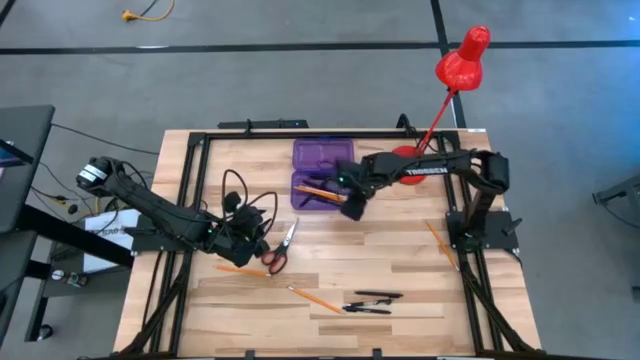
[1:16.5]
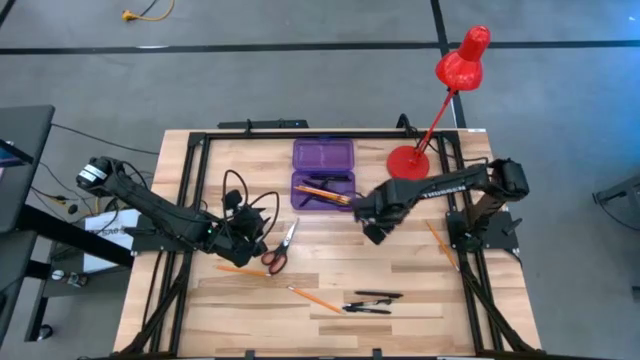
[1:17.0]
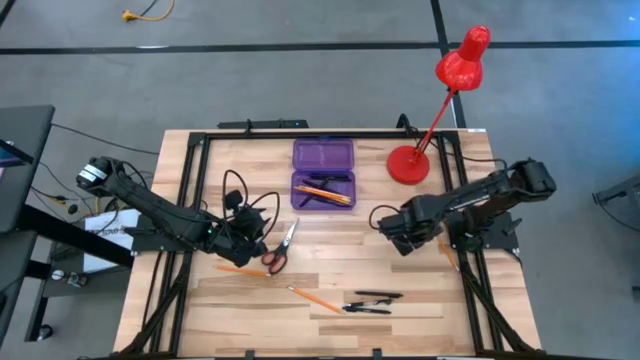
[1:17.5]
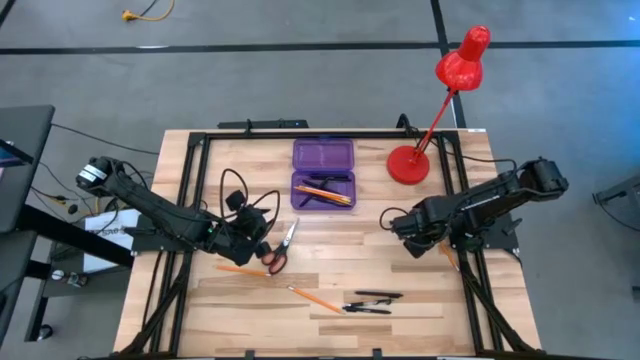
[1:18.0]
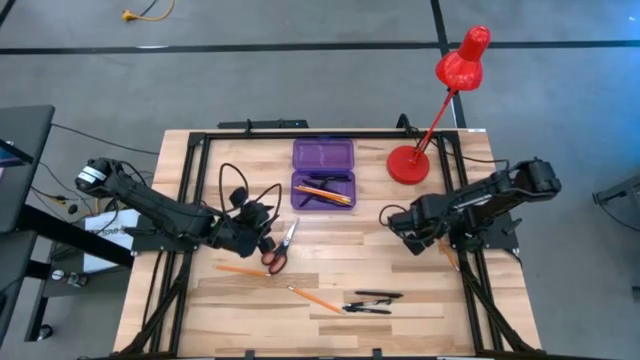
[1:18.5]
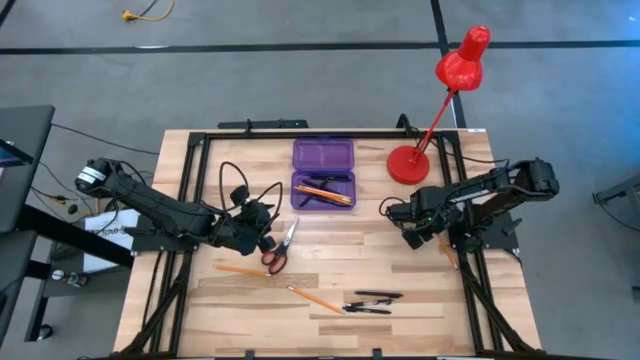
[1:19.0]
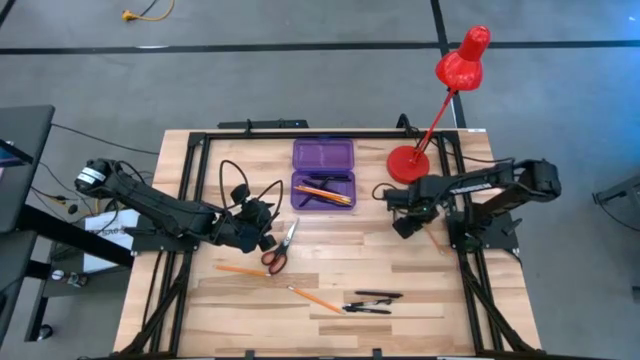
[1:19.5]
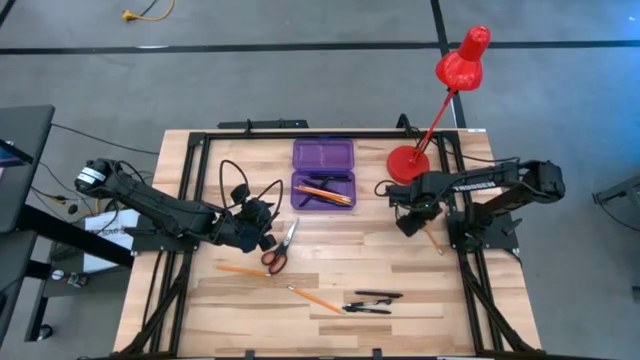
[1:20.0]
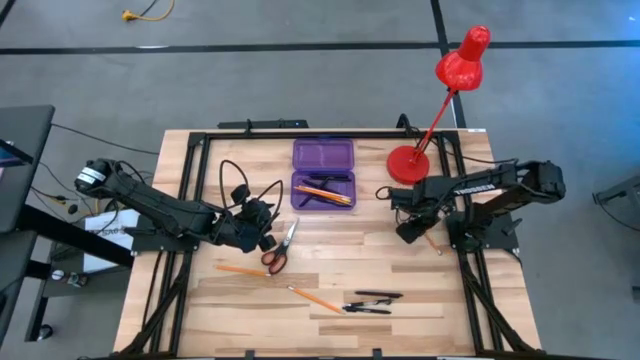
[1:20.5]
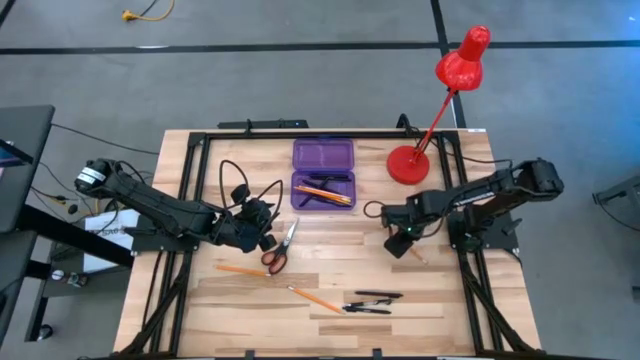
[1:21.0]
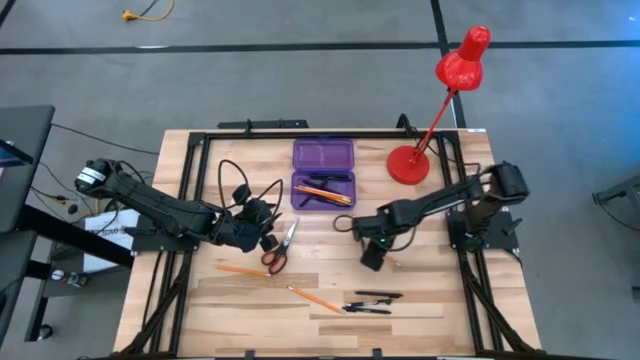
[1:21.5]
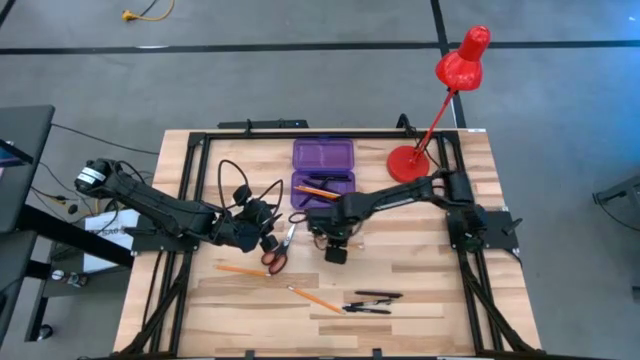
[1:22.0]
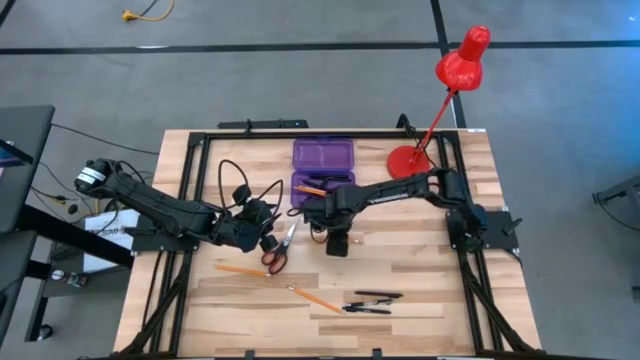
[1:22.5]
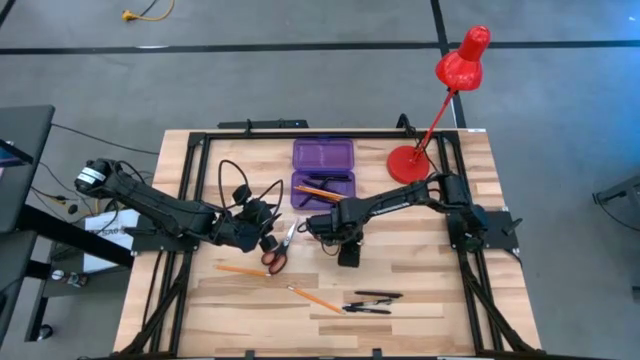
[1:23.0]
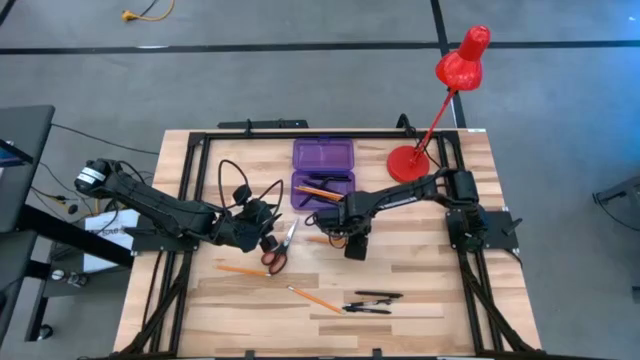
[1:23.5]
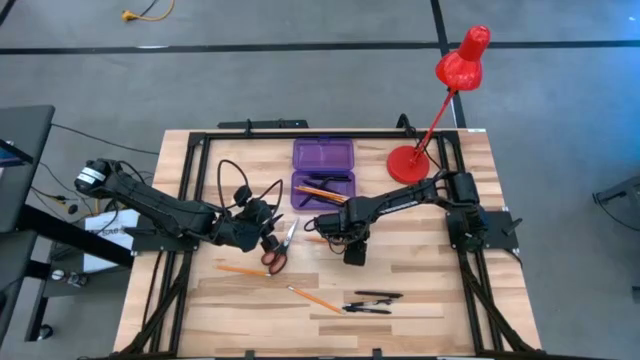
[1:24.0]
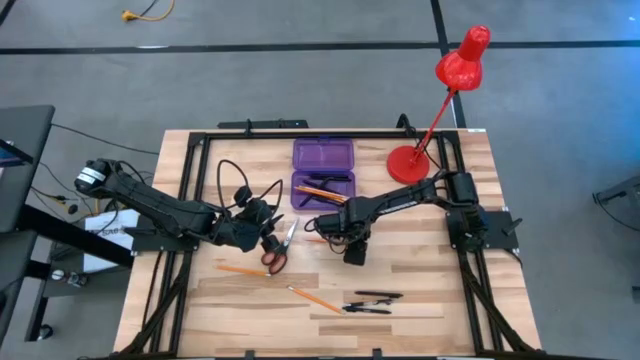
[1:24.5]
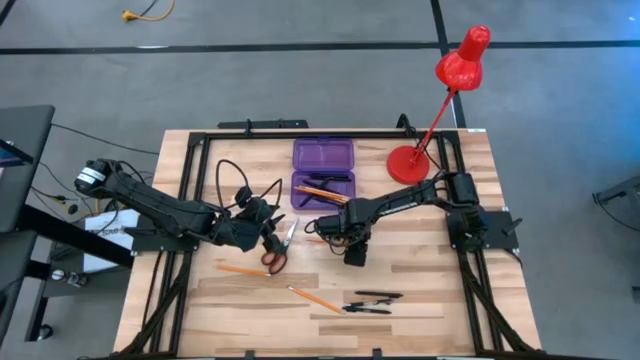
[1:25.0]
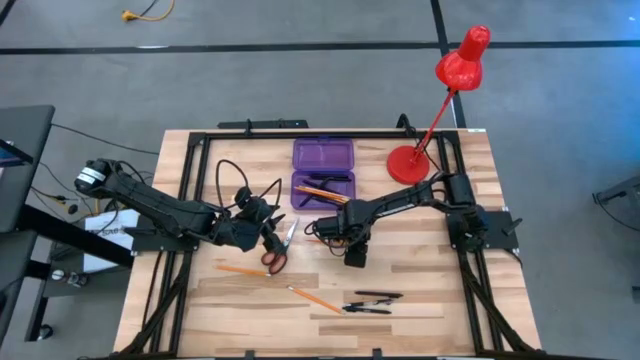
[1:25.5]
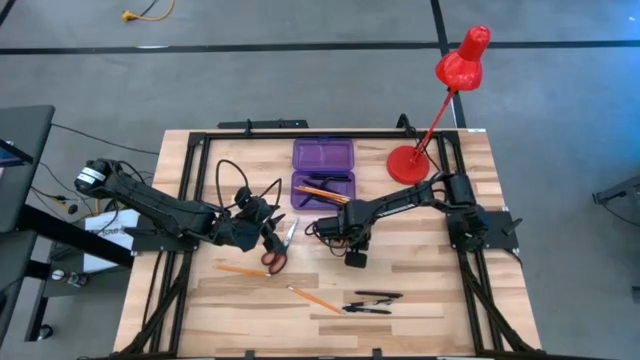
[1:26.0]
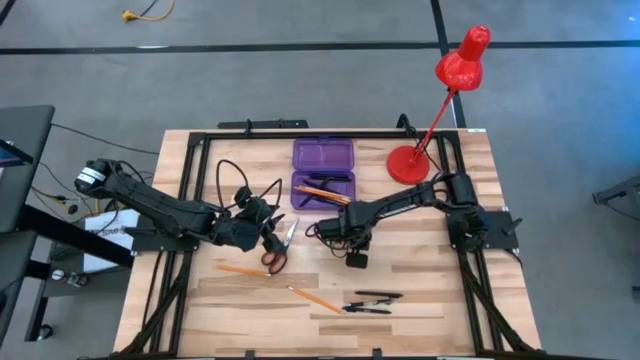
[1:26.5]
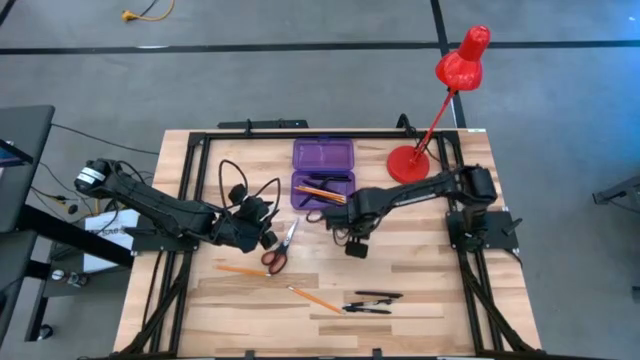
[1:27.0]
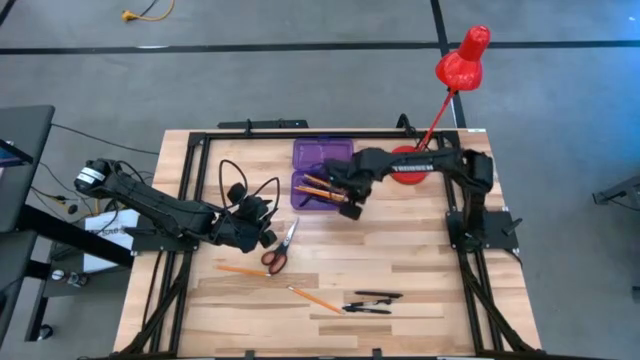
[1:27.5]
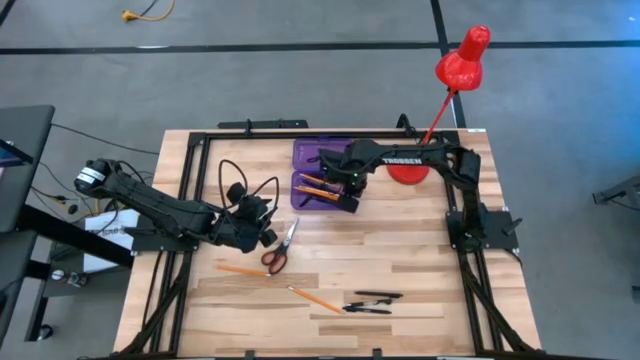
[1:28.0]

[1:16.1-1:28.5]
Task: Pick & place school supplies into a supply box
Put the yellow pencil into the purple supply box

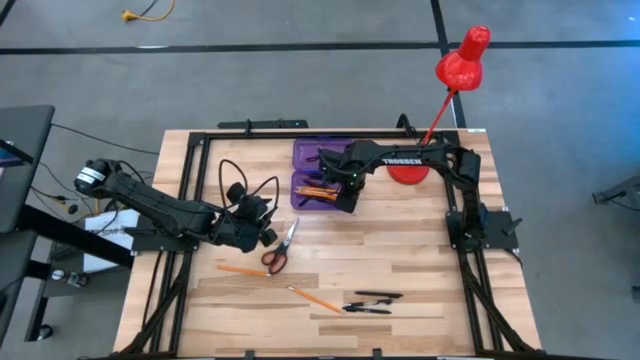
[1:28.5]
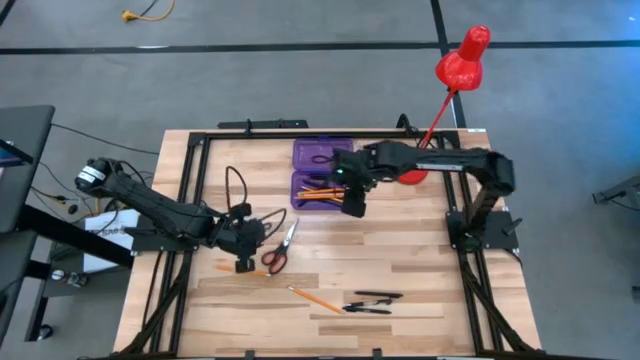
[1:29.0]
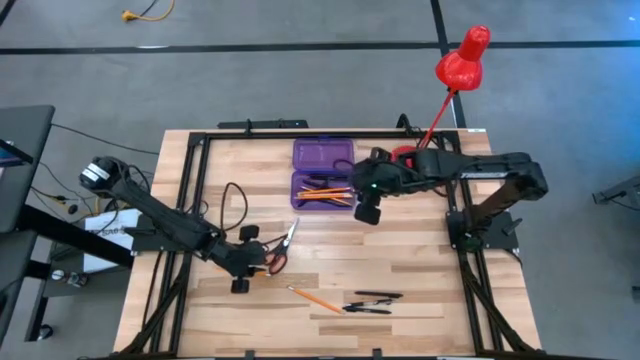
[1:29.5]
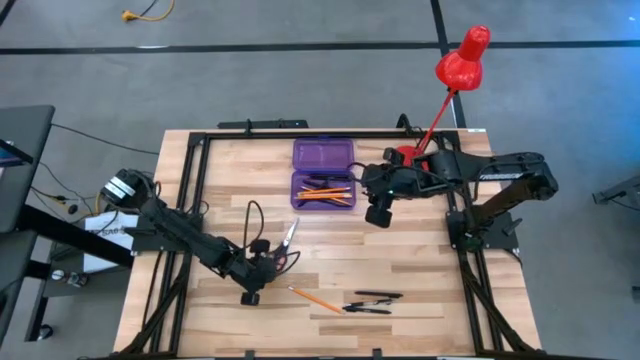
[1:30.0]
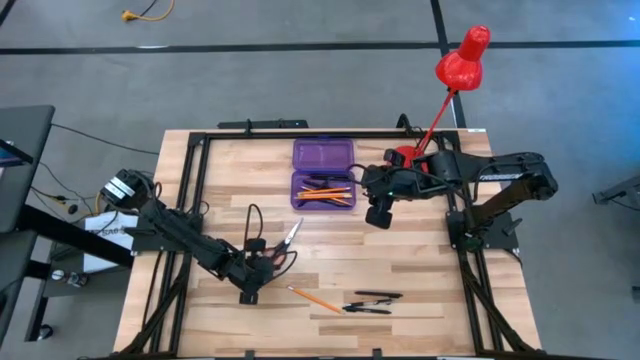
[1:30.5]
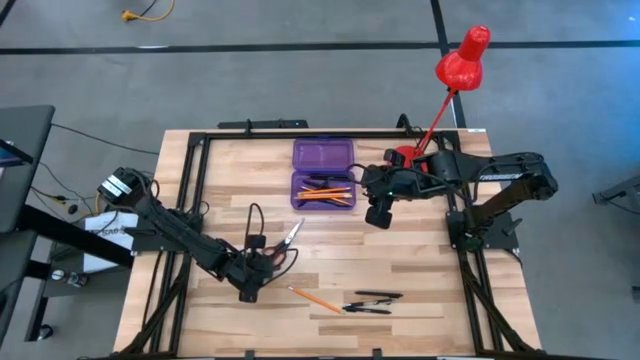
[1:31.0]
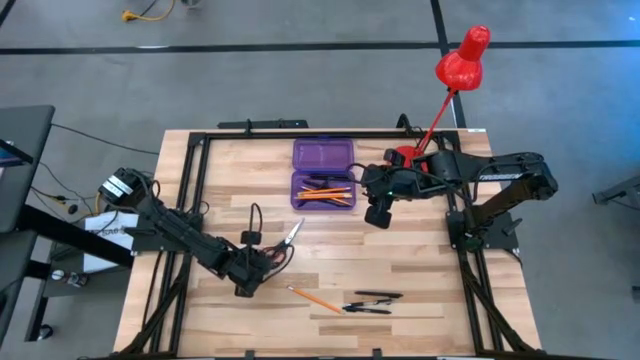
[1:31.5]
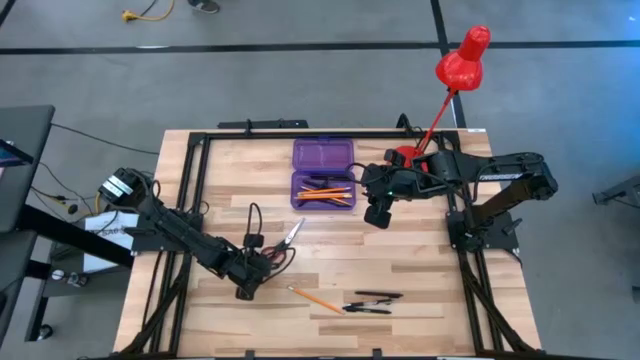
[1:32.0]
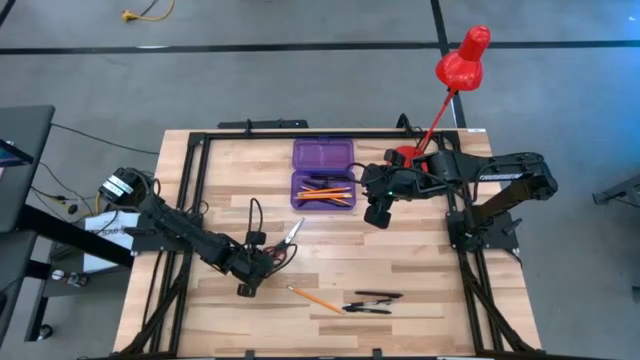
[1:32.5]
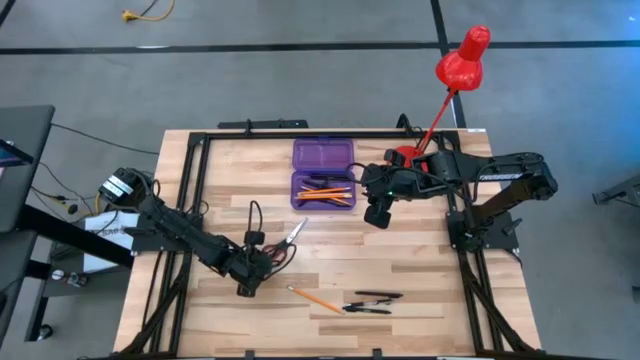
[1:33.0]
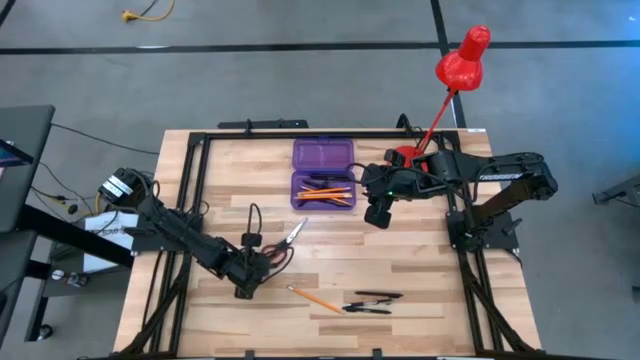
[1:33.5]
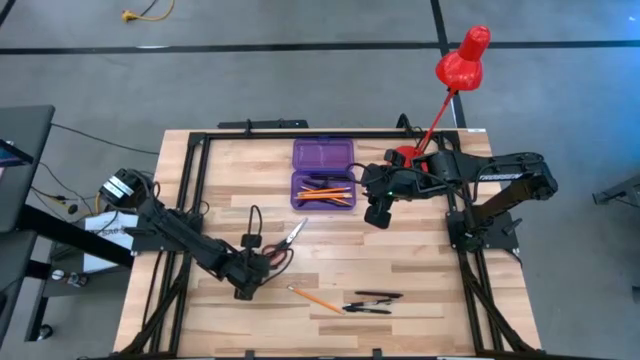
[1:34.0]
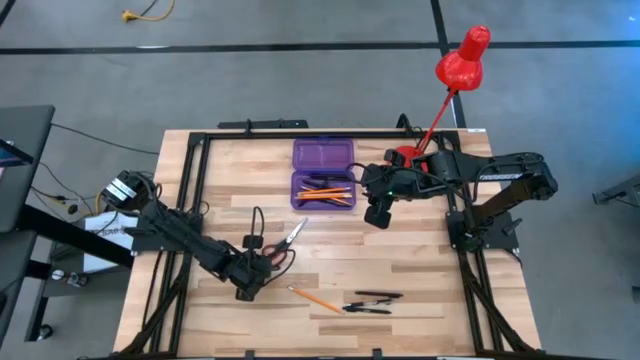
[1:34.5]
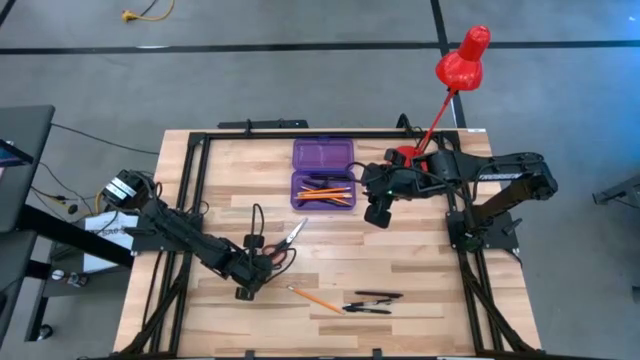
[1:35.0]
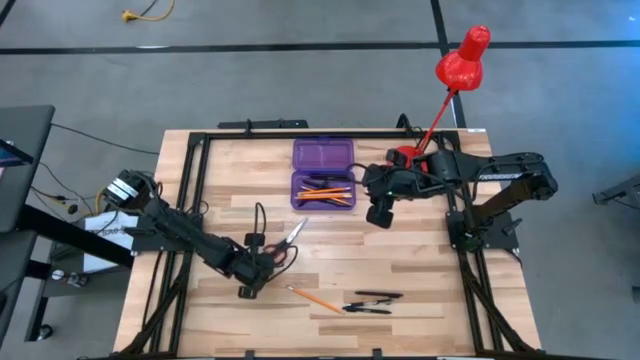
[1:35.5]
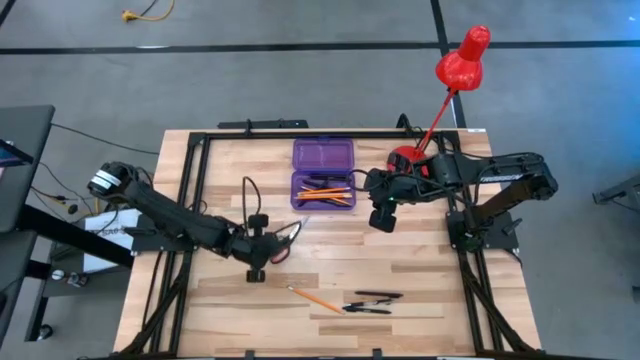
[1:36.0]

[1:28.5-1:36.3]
Put the yellow pencil into the purple supply box
